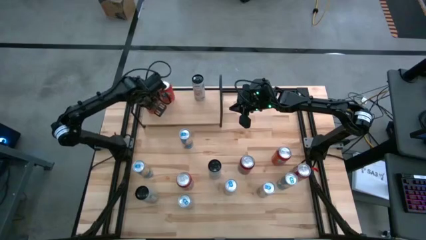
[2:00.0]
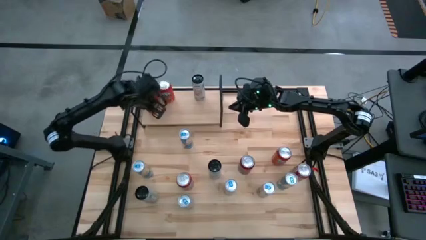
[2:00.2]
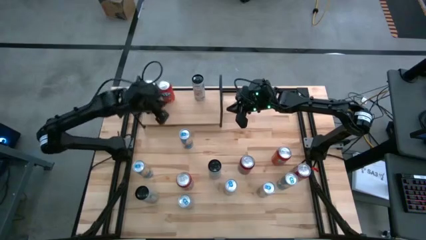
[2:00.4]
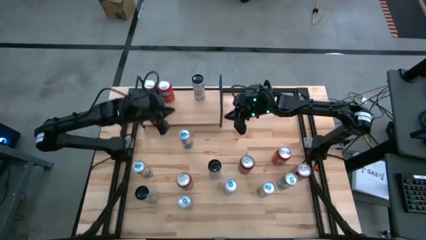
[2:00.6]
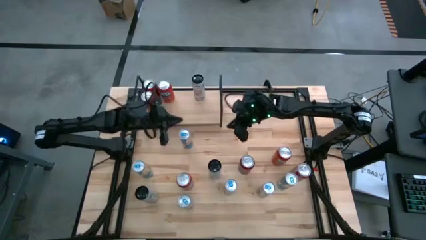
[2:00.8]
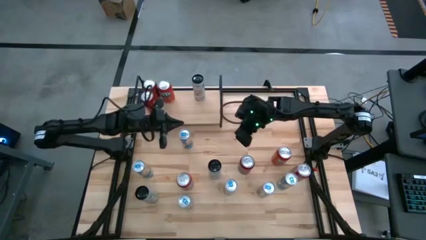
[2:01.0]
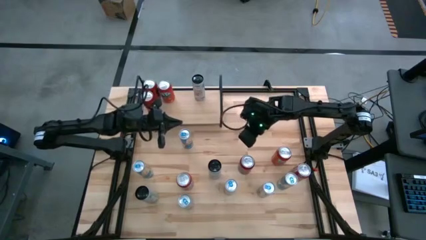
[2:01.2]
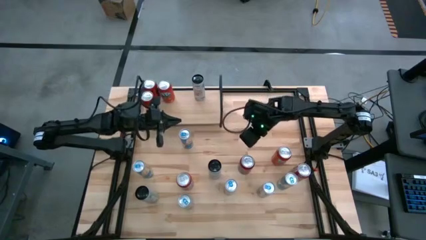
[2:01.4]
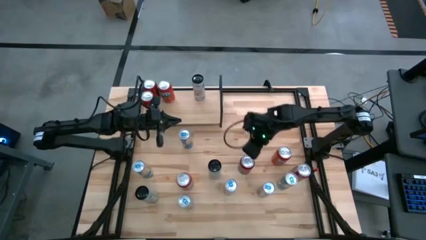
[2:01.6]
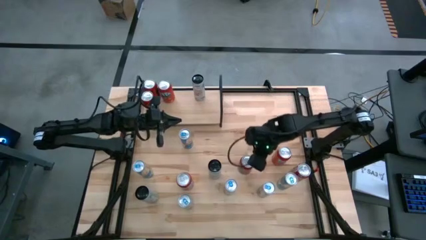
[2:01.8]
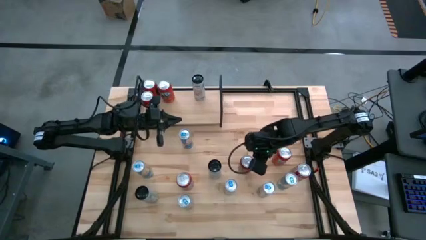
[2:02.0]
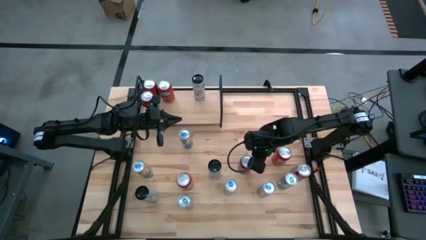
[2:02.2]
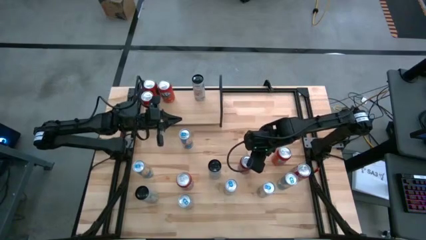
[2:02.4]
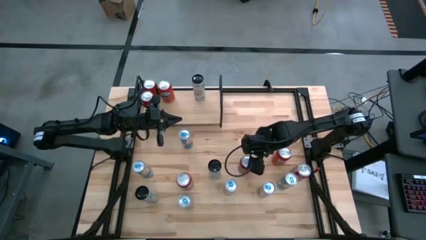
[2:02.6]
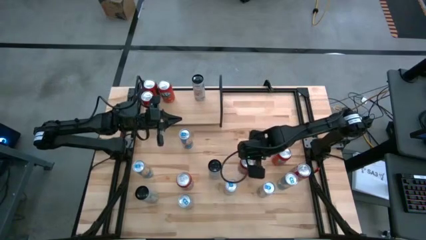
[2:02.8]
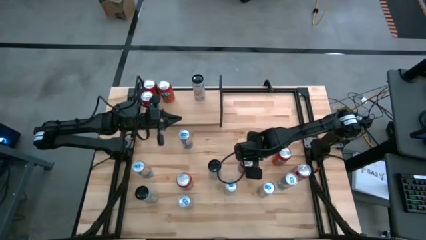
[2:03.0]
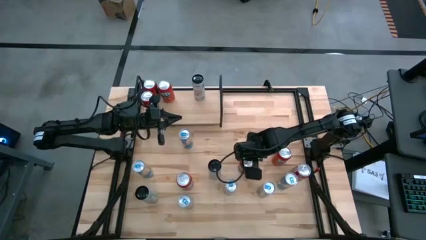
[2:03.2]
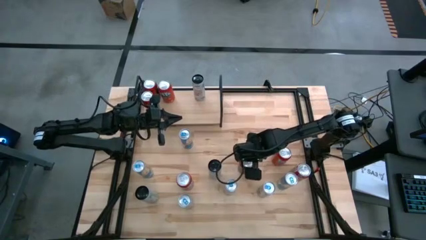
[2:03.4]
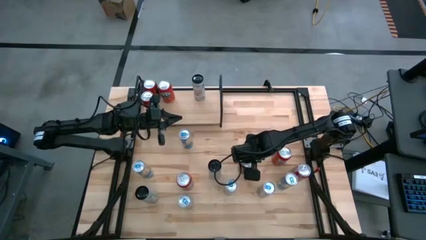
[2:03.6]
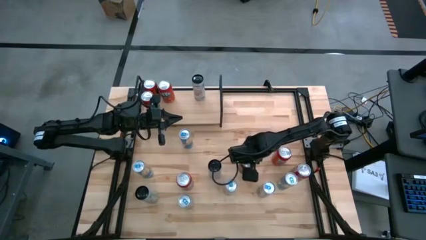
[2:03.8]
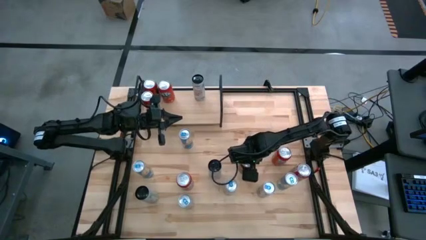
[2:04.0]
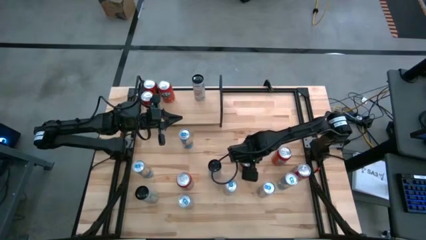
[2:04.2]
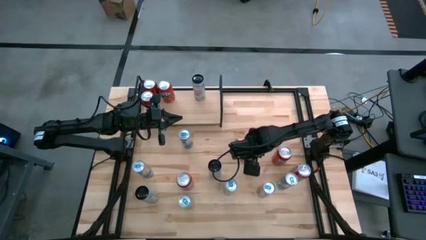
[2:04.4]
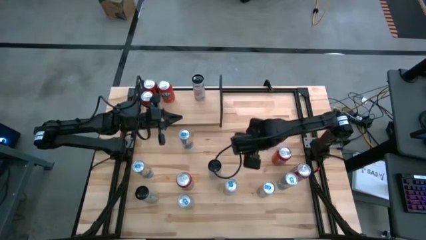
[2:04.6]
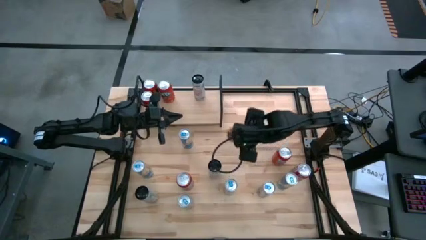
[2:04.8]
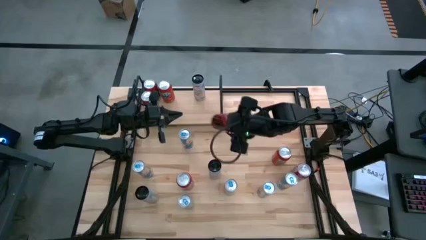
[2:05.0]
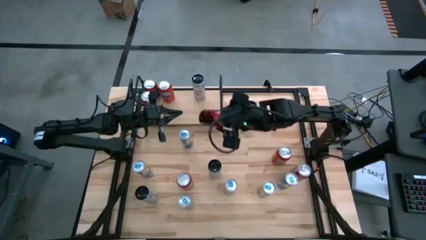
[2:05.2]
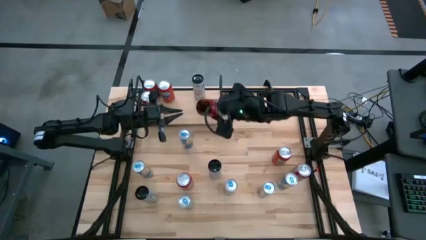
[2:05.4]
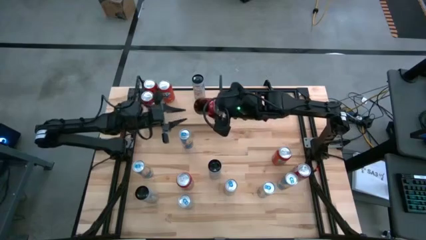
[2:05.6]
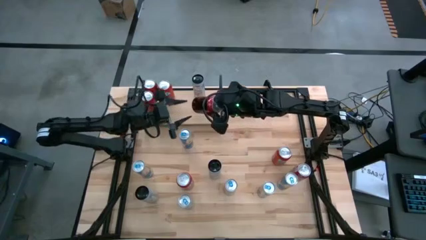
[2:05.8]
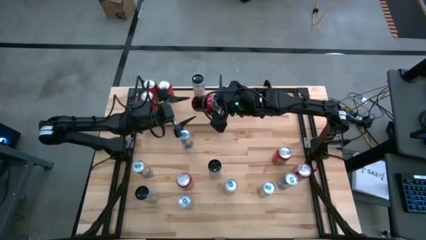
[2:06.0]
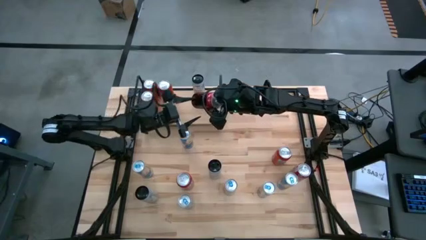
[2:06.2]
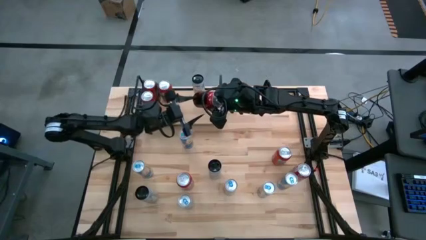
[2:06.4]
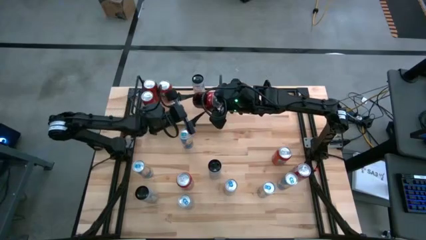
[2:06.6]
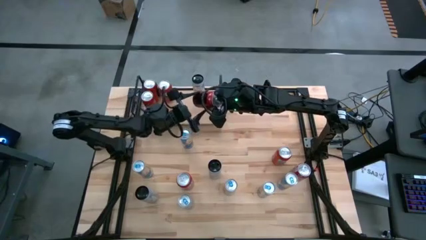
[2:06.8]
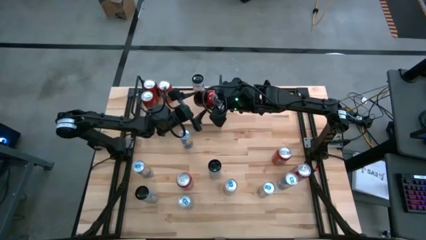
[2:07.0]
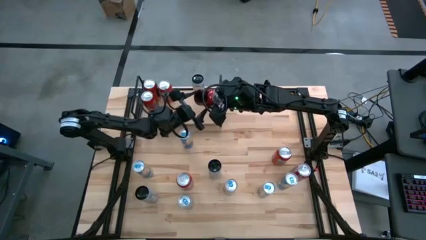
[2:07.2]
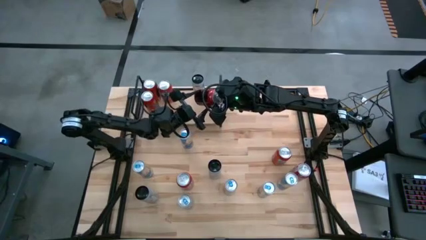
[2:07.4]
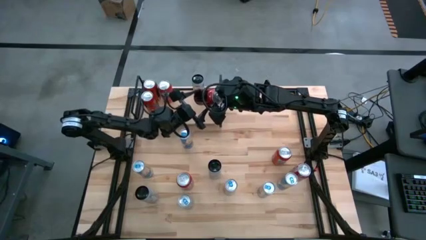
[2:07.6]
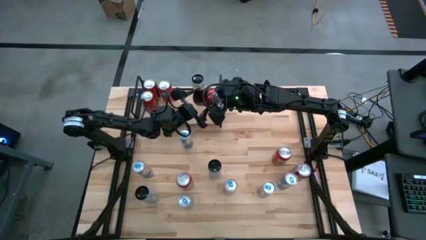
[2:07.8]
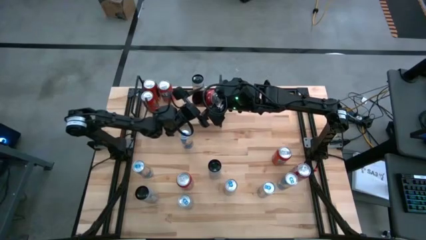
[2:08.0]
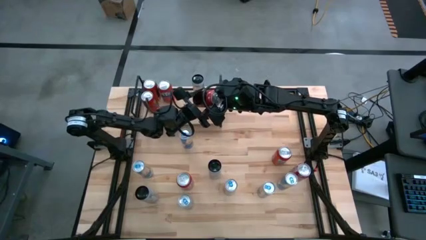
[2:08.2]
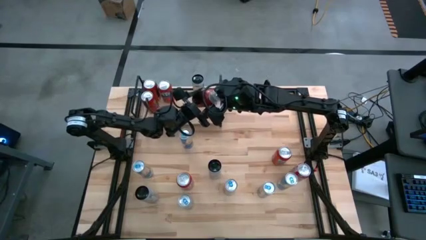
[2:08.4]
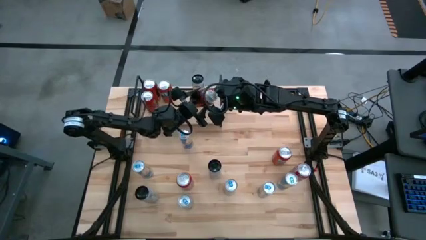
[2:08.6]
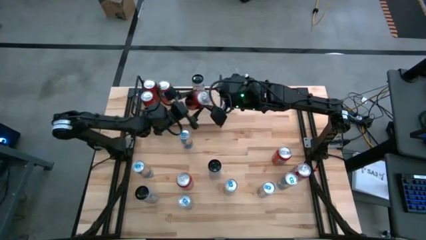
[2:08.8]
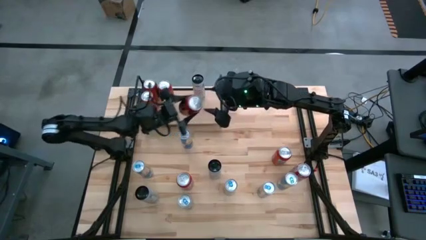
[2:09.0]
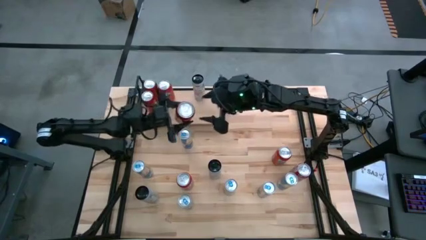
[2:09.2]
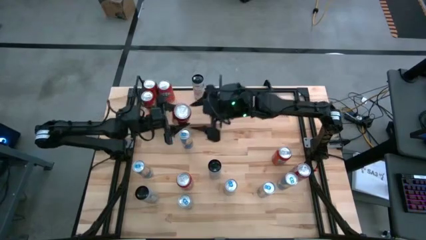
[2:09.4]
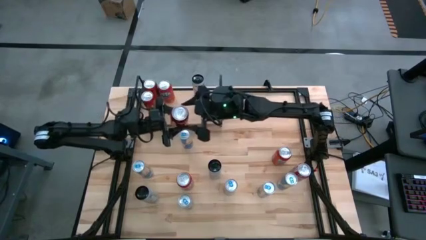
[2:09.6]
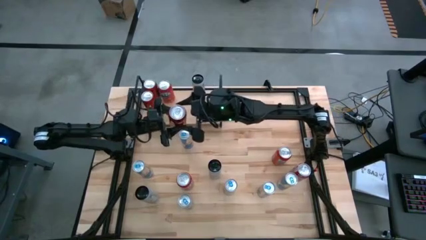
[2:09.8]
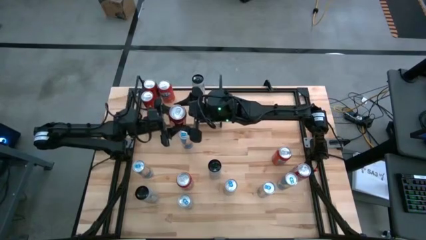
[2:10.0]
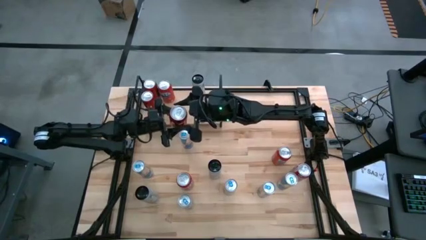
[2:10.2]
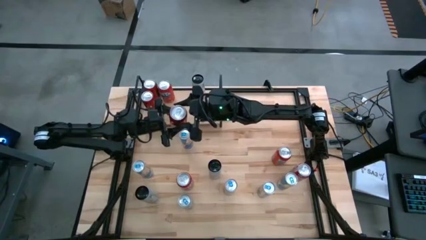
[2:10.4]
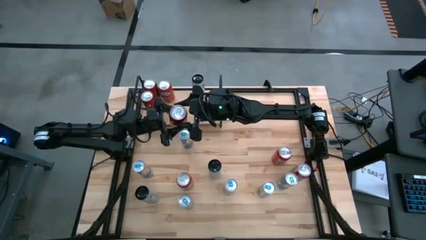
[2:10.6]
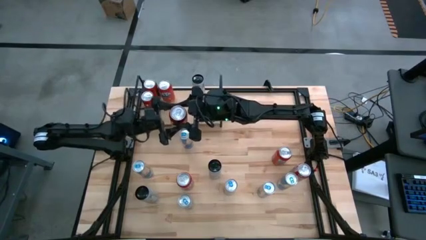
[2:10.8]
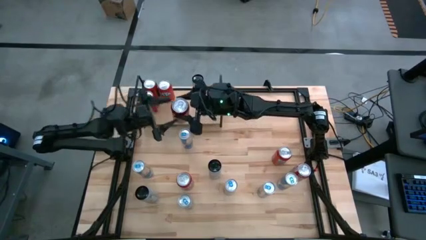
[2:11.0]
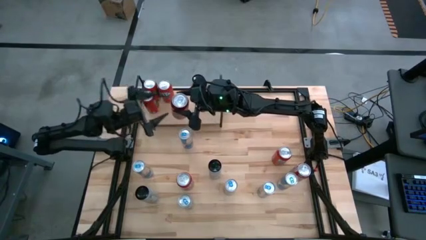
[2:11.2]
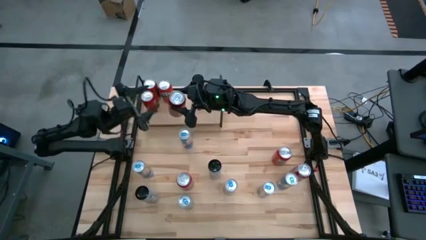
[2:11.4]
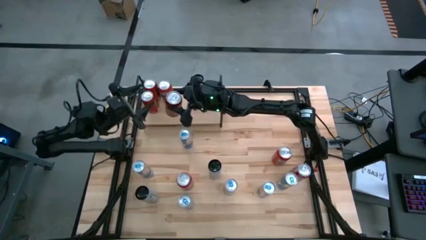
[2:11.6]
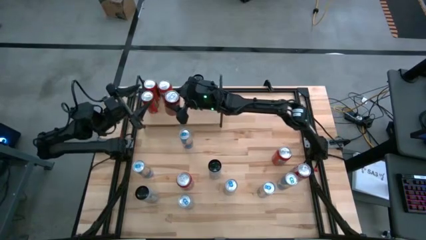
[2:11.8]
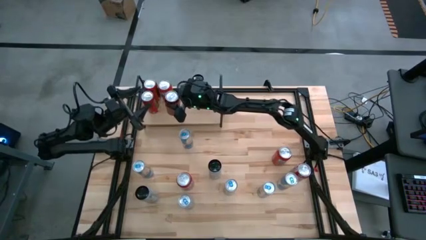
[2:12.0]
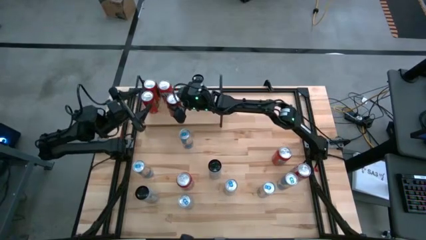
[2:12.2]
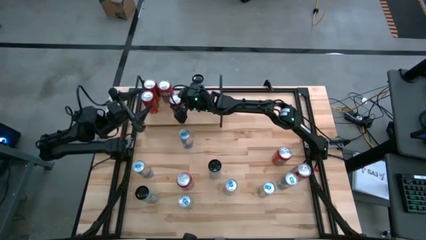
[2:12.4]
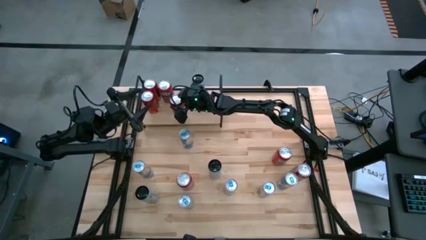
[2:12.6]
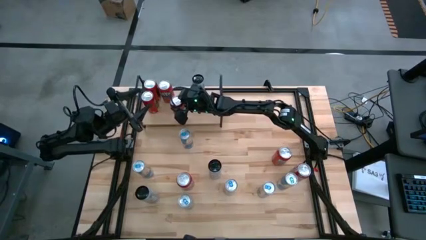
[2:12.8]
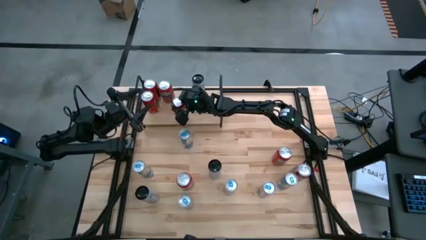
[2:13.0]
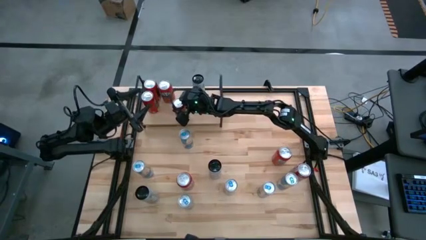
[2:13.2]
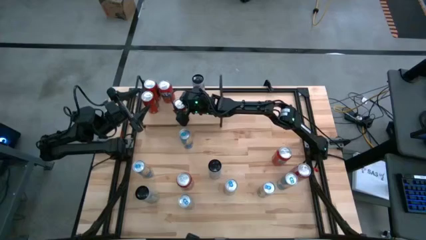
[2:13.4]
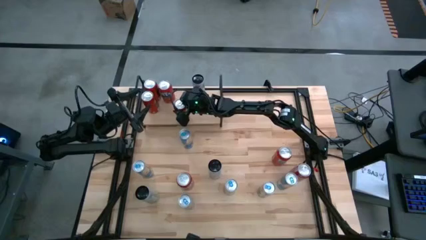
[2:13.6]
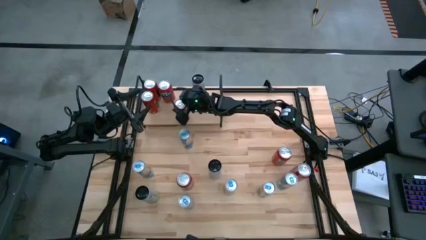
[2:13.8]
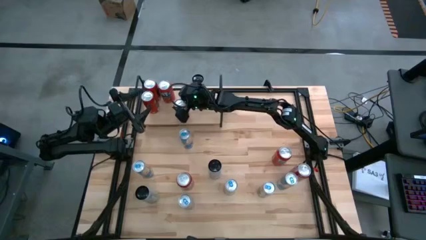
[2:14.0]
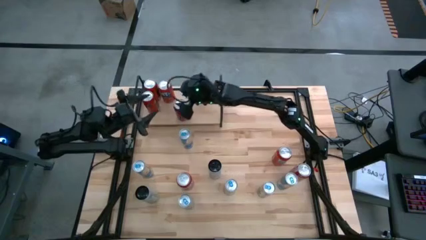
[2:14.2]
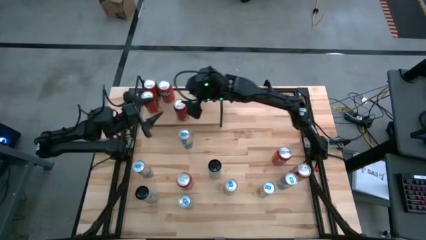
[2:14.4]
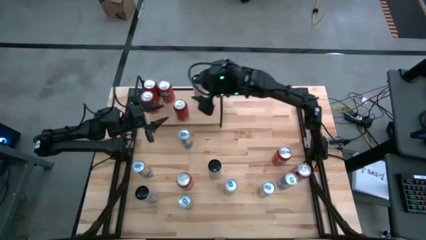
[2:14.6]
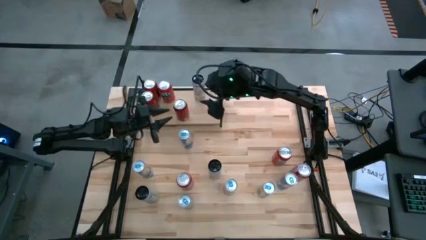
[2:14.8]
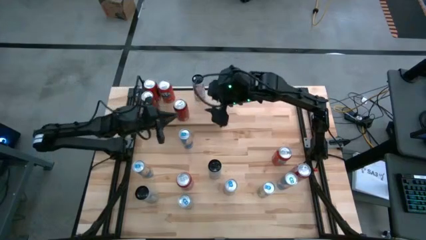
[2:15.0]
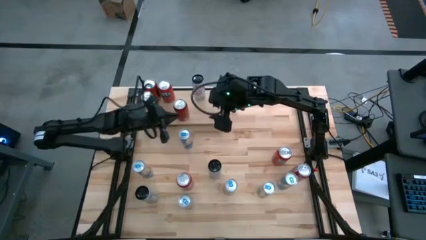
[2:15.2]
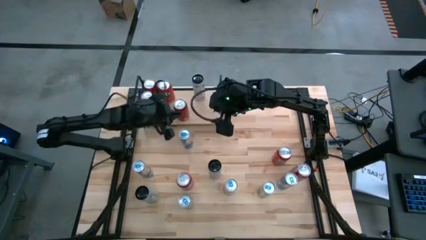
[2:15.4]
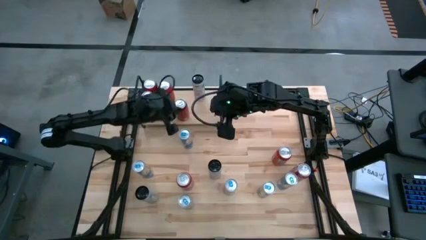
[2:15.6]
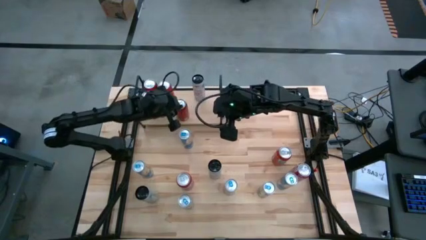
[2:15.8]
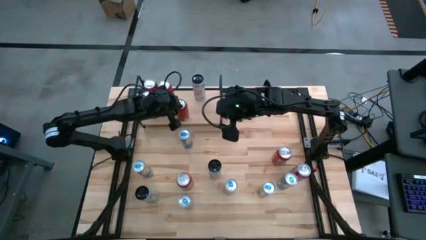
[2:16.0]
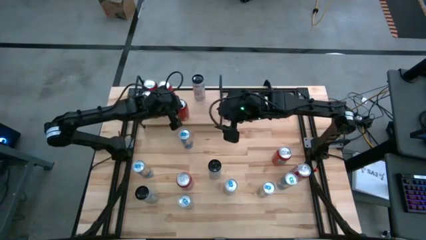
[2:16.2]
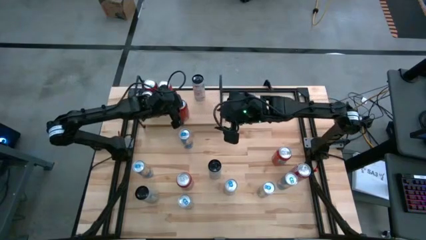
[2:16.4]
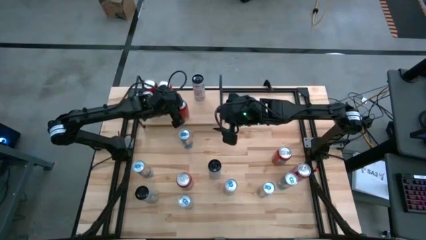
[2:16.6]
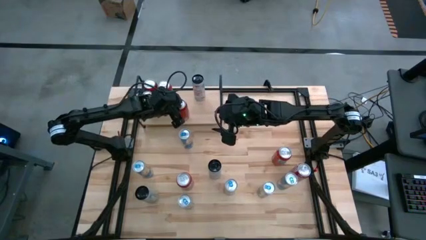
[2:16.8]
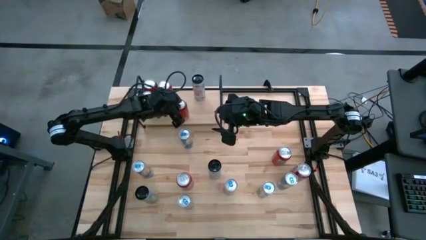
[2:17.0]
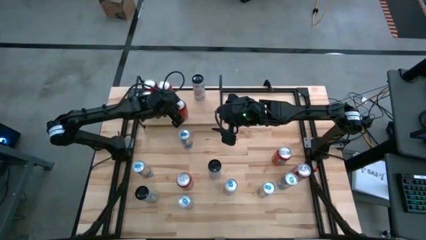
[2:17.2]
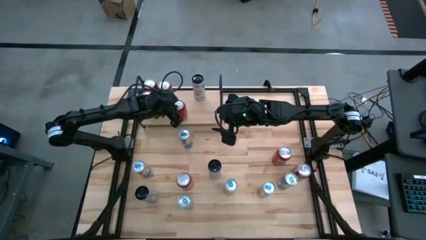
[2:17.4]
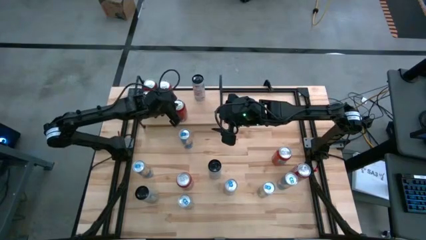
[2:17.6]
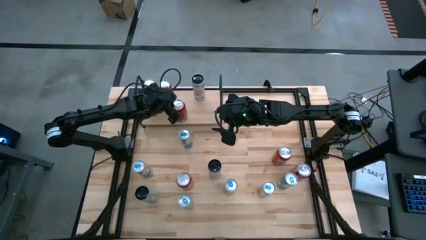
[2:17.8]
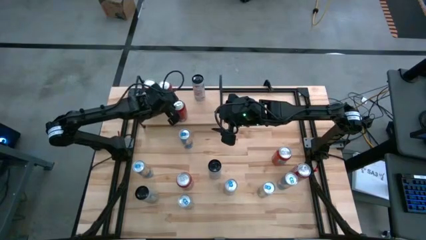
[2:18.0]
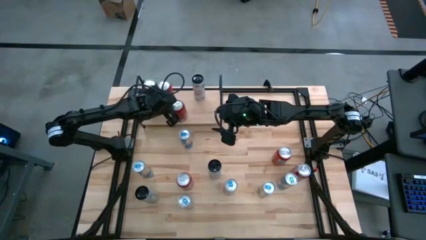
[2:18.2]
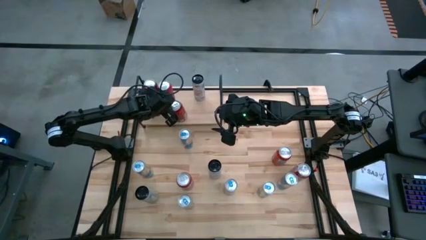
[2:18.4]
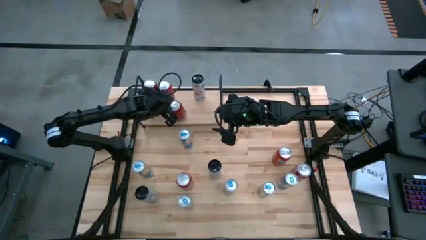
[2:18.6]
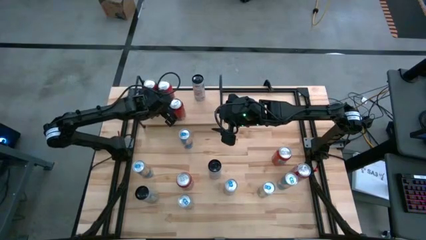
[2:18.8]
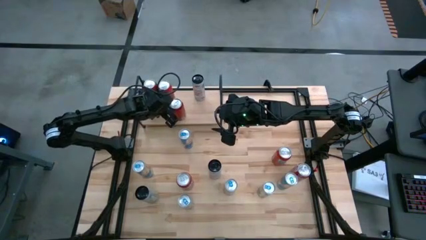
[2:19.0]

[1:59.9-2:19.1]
Task: Place canned beverage on shelf
Put the red and black soda can on the shelf aligned with the other red and black soda can
